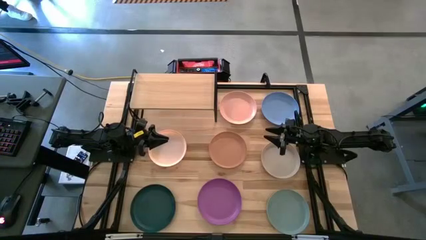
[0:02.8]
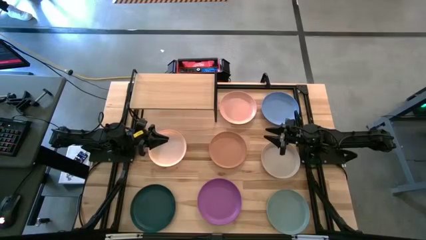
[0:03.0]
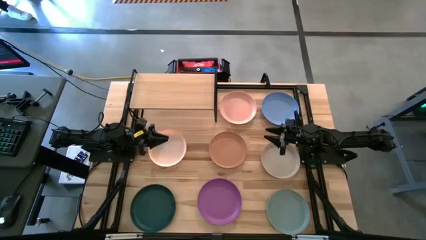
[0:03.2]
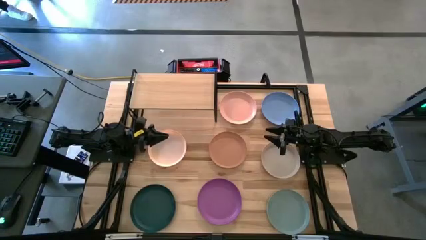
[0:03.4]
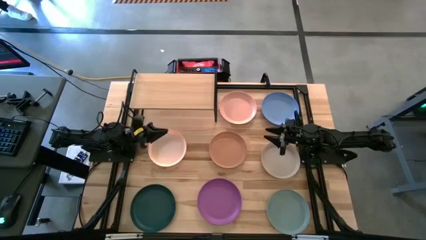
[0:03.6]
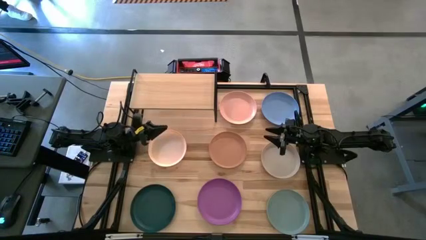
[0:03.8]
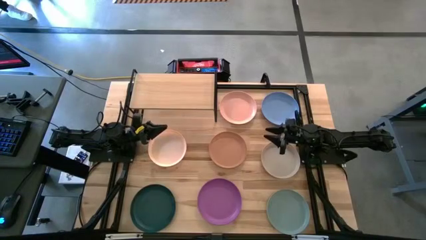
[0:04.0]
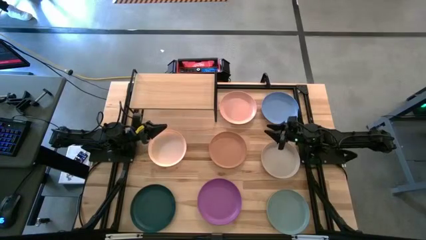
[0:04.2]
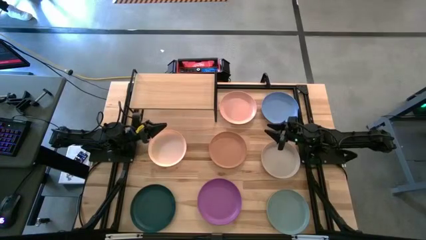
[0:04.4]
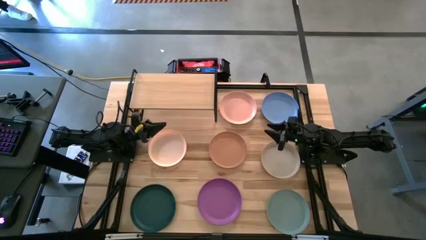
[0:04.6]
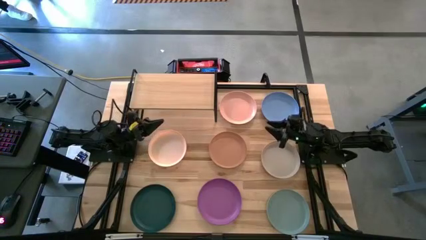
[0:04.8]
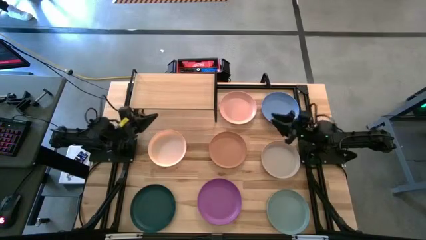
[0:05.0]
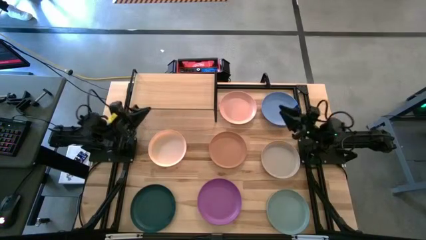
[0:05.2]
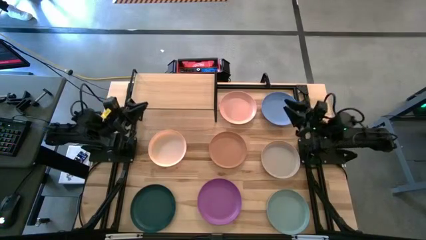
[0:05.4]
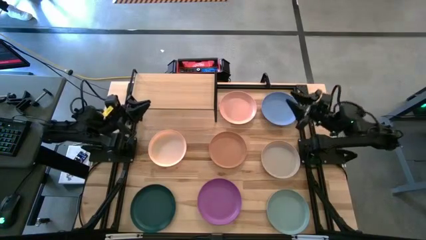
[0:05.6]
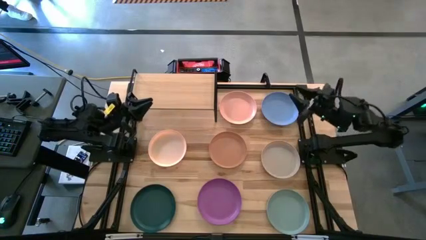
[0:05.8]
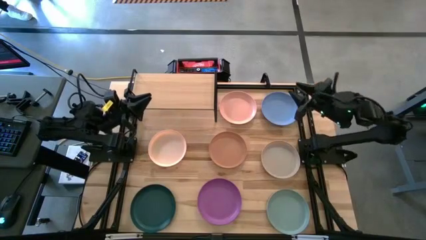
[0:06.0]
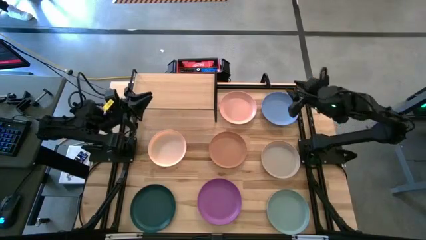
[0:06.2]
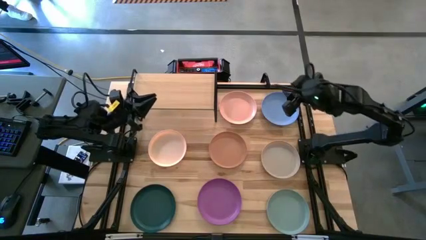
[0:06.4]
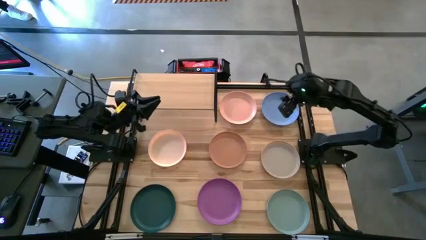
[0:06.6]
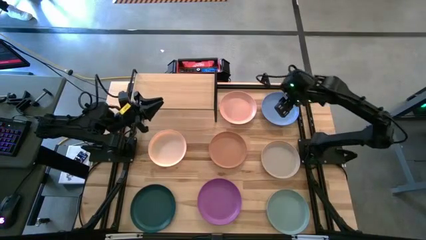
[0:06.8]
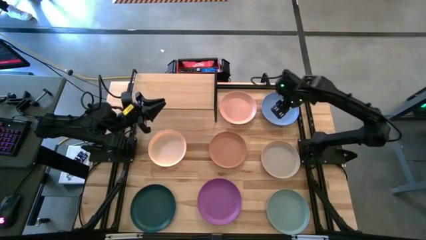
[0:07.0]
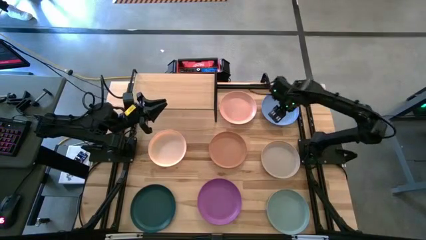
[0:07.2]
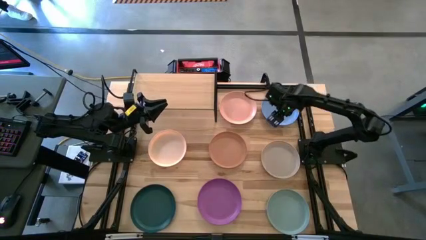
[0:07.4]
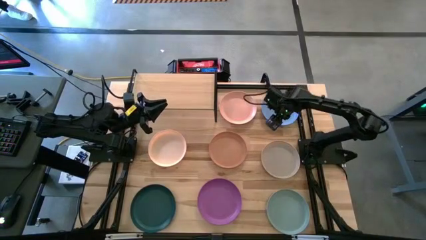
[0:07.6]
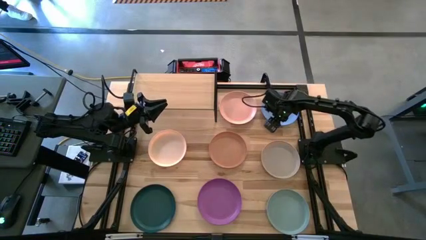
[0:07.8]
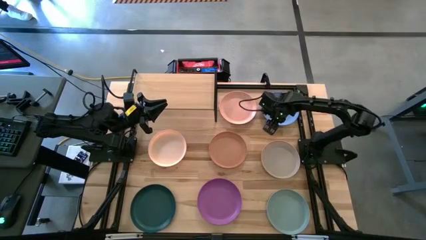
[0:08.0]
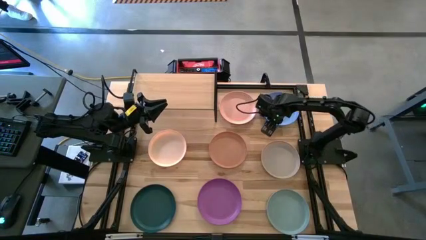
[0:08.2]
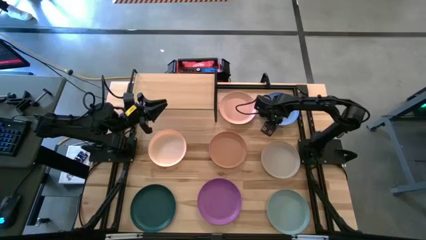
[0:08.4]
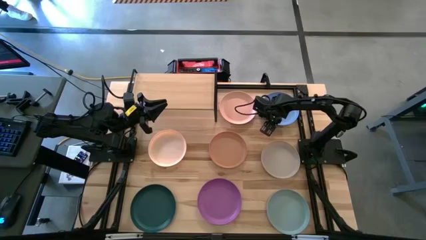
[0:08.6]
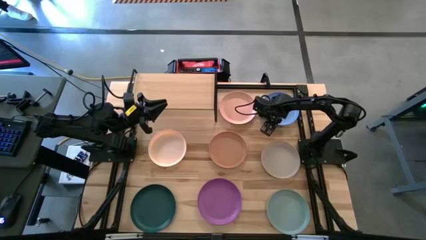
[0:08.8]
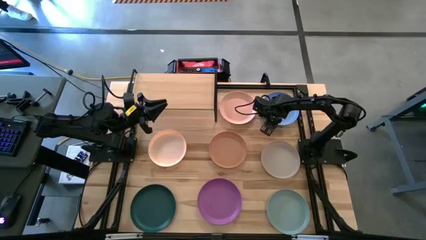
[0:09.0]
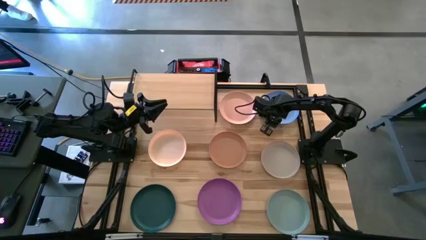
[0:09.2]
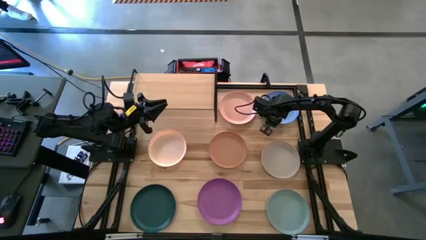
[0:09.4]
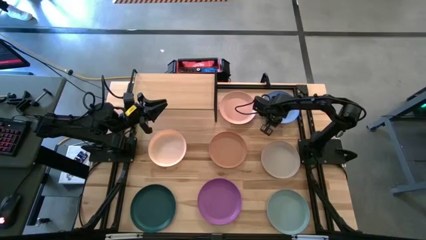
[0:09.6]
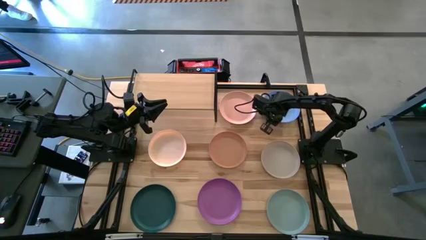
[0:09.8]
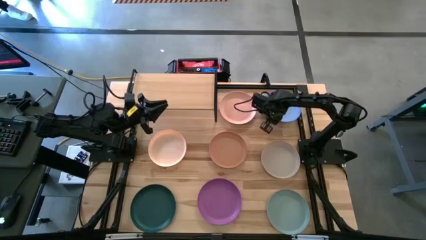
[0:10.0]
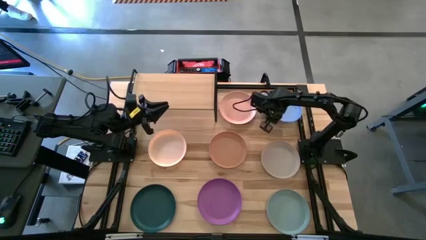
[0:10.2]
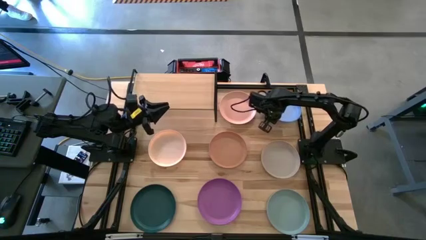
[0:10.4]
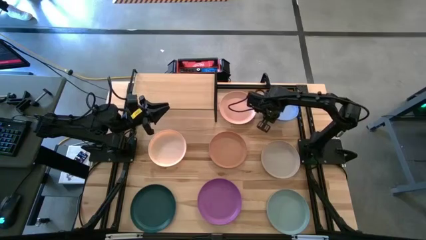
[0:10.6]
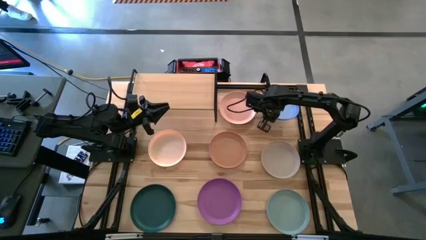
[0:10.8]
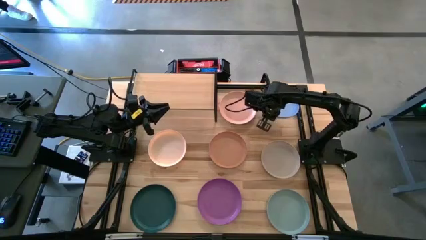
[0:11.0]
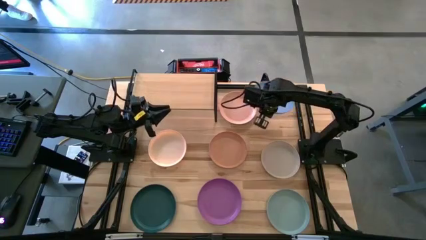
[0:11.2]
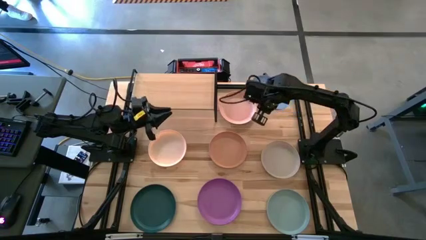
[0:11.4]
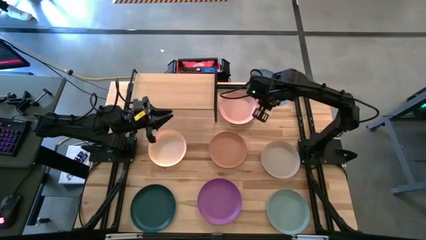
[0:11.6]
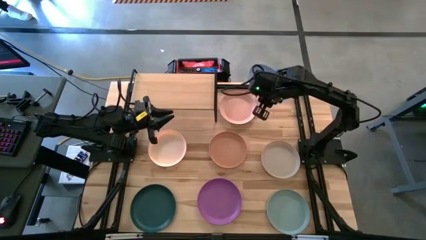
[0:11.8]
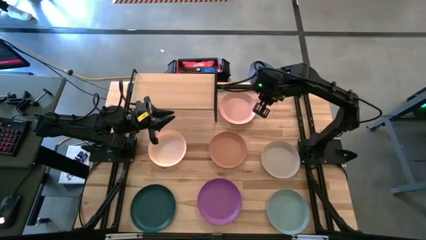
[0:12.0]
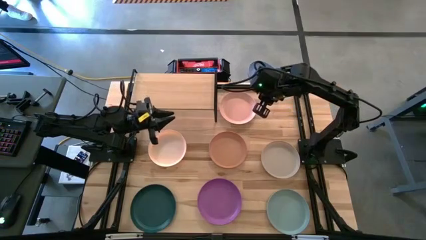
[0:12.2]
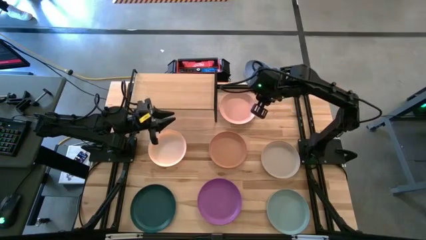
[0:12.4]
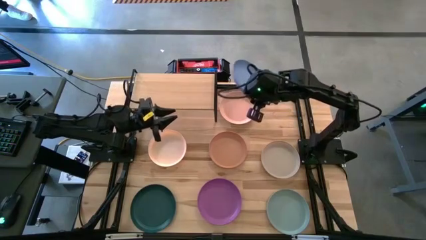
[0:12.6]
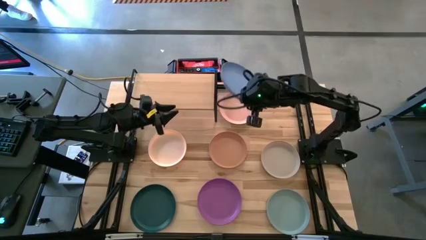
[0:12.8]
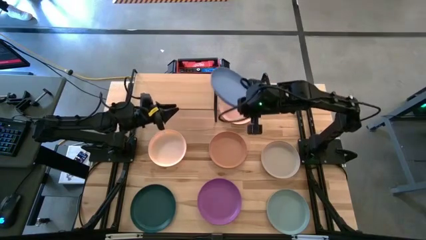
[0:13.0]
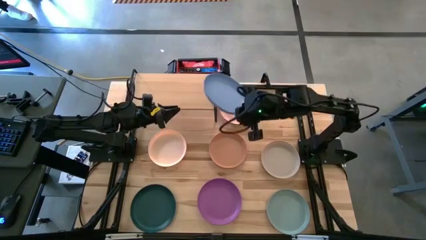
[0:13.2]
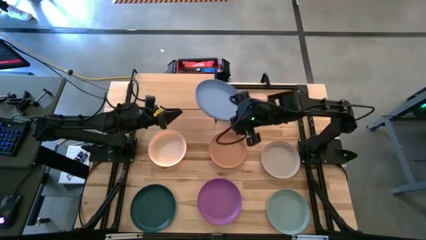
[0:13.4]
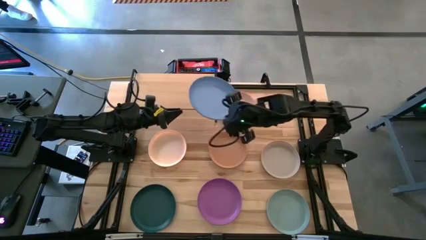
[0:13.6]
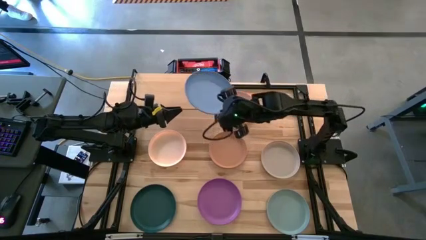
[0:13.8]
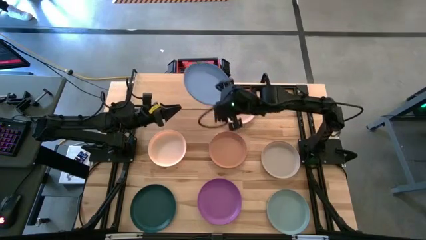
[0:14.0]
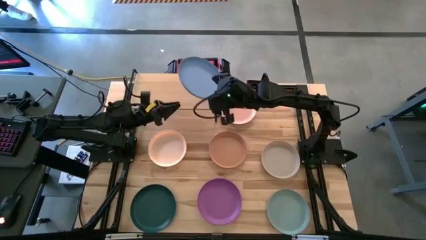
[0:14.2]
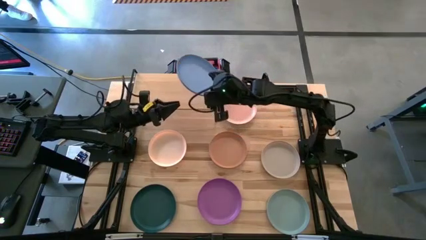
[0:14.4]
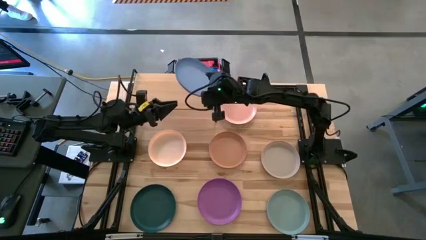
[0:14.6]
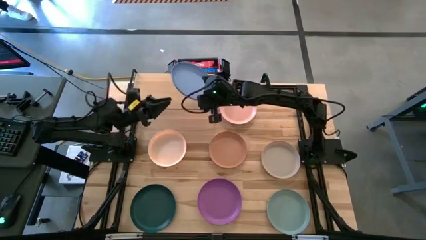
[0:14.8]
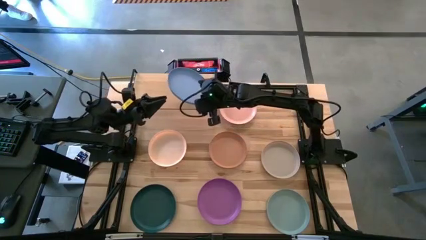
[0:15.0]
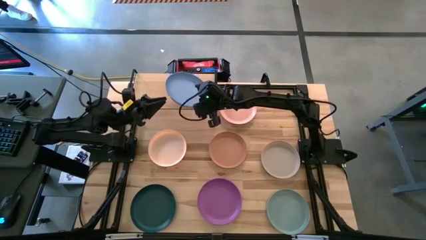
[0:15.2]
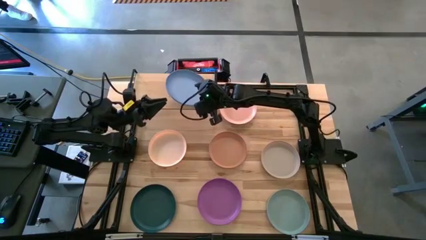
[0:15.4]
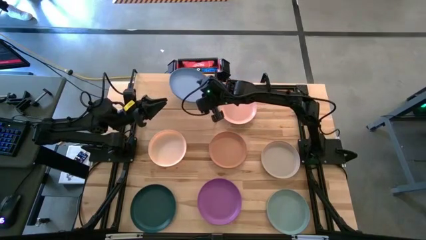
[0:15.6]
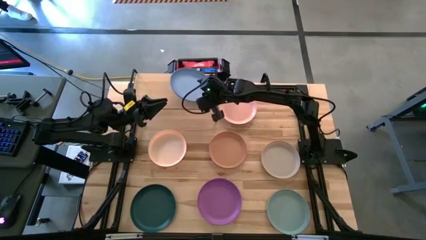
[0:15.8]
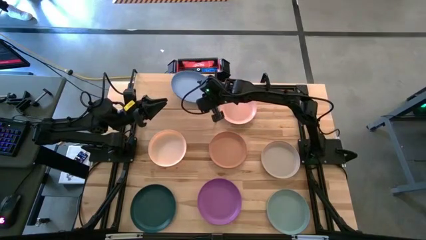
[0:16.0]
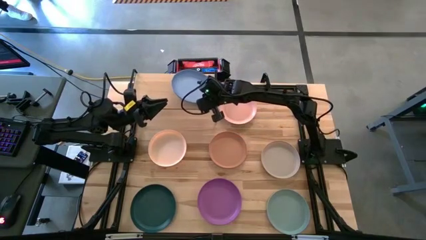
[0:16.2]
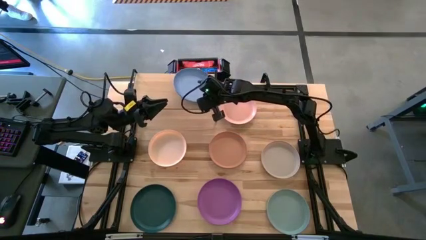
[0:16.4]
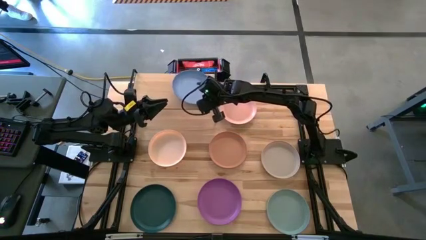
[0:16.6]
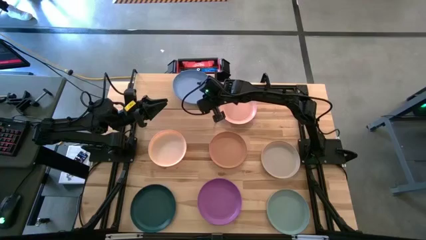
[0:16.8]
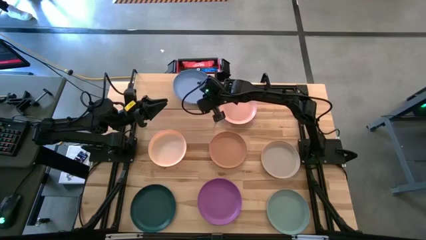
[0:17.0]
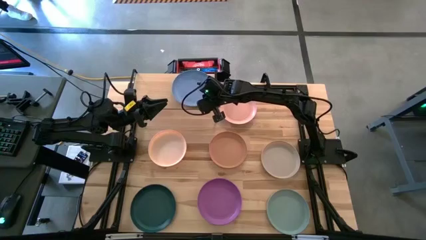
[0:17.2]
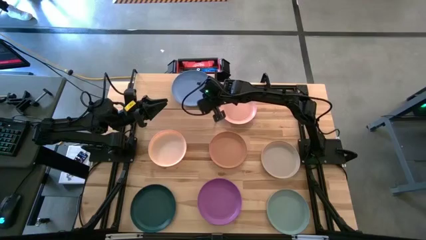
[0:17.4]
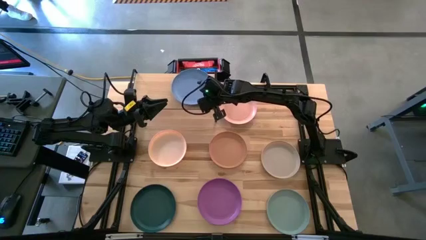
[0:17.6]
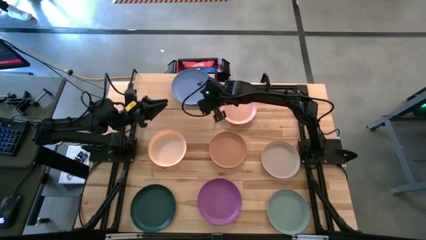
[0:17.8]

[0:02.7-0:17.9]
Task: Place and stack plates onto a shelf
Put the blue plate on the shelf
